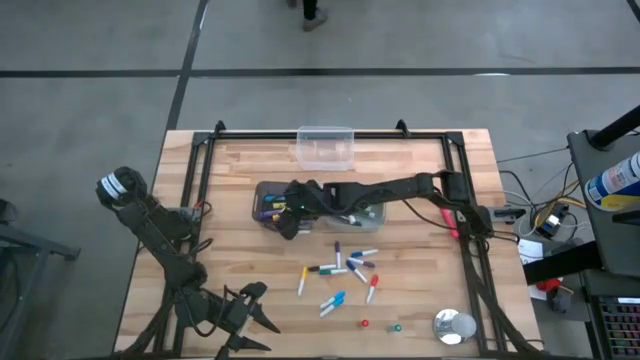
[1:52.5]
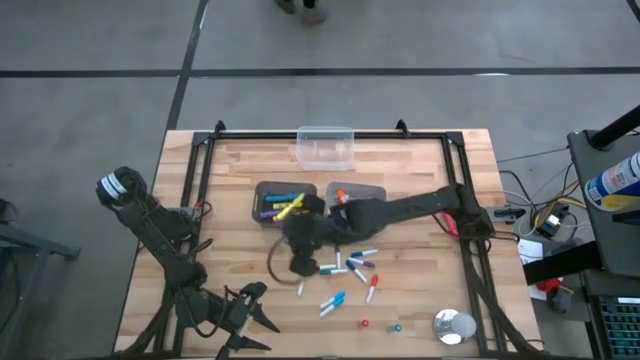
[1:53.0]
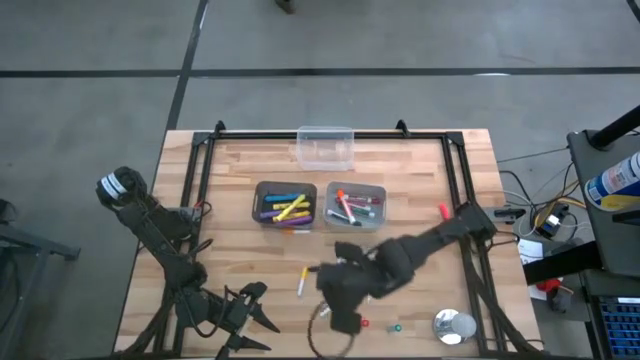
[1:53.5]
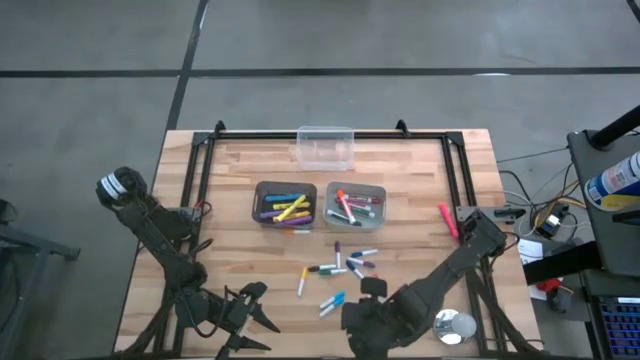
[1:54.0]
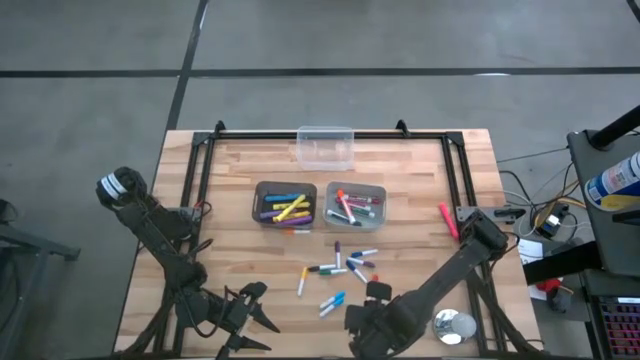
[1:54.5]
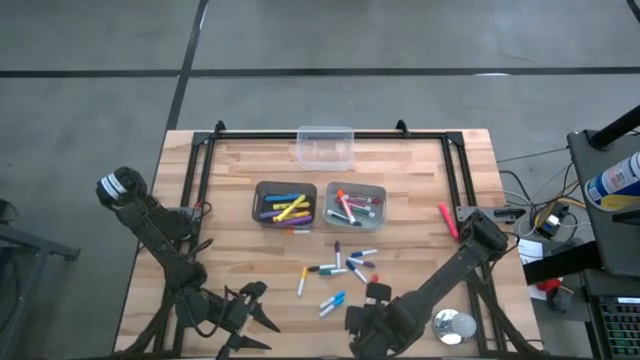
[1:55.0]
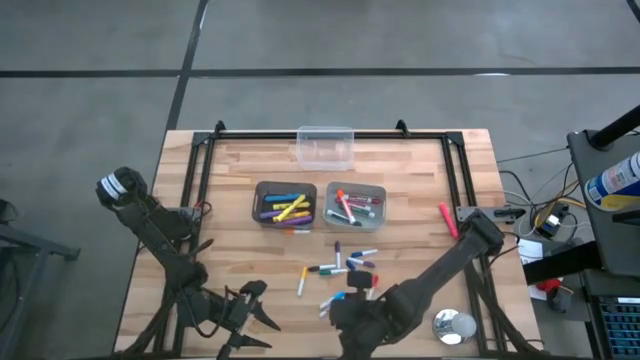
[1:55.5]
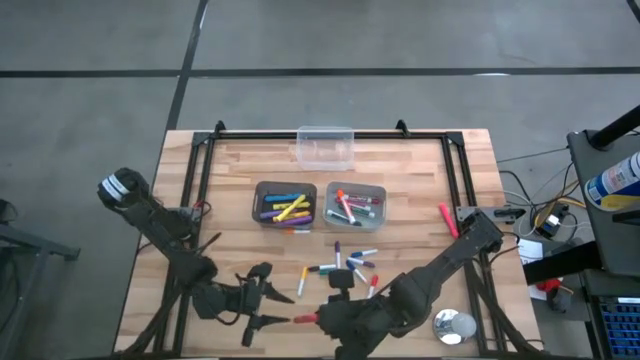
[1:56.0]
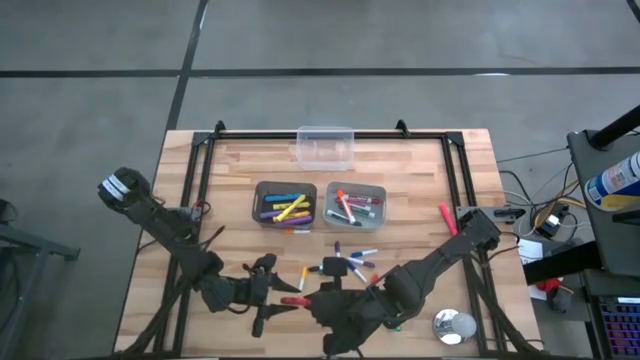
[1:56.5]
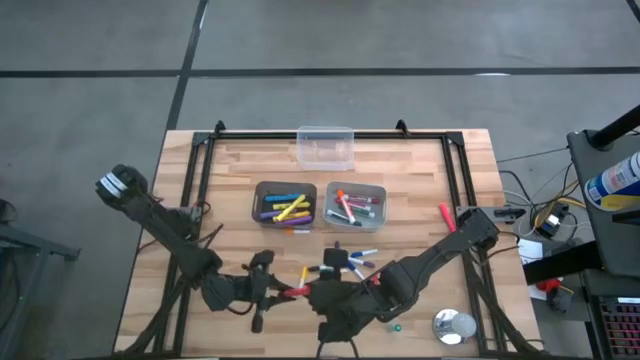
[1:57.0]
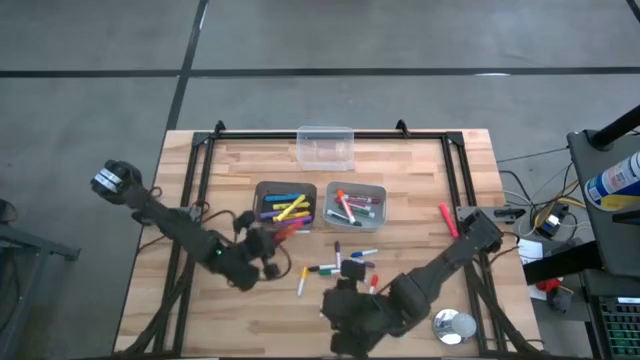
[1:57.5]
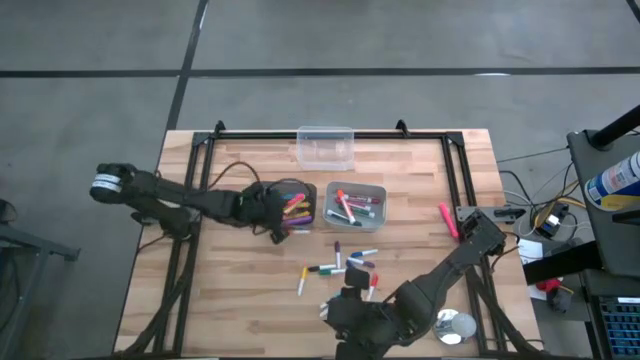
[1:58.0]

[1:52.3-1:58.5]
Task: Pick & Place Markers
Put the large orange highlighter pen into the black bin

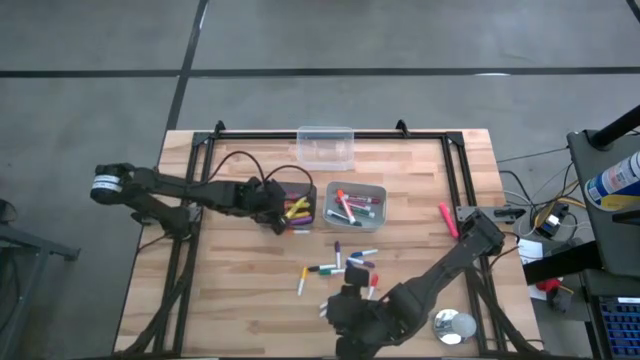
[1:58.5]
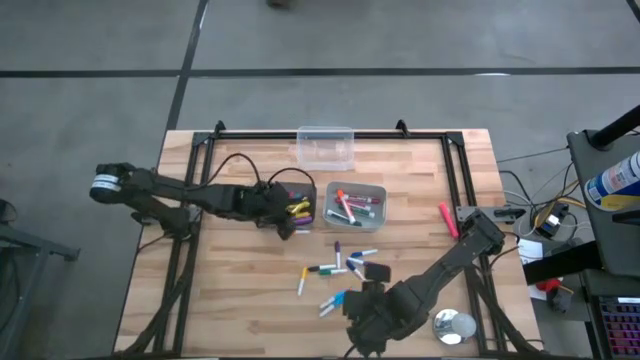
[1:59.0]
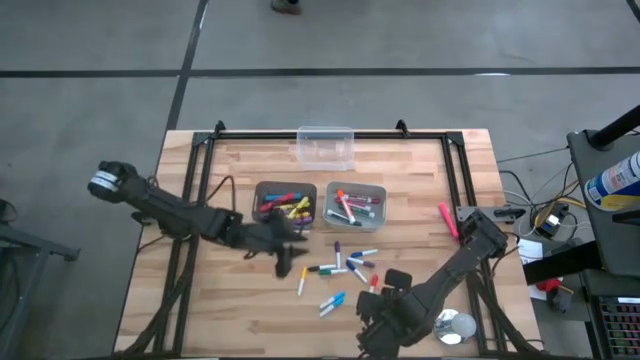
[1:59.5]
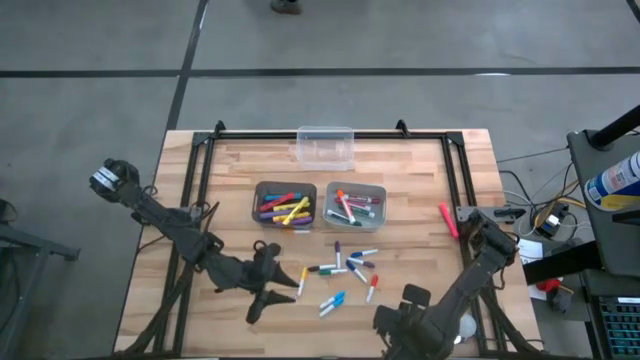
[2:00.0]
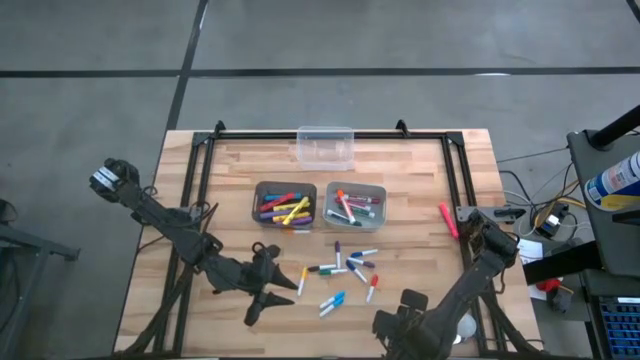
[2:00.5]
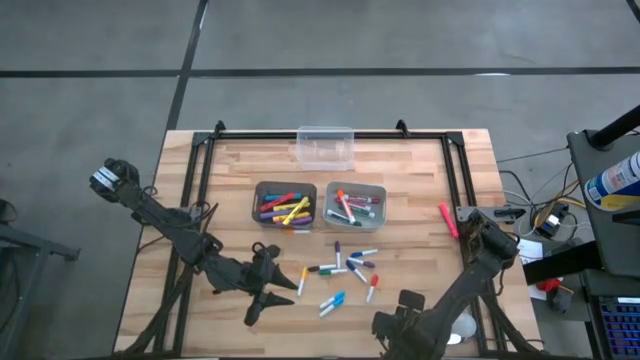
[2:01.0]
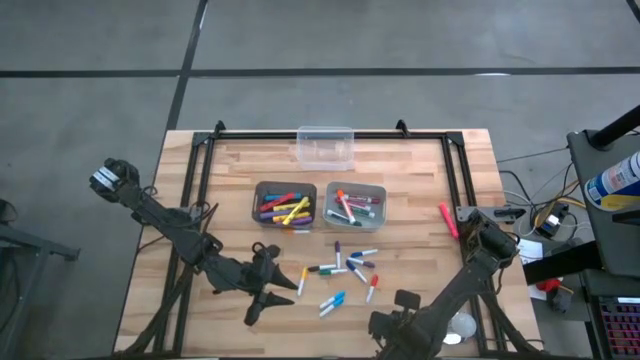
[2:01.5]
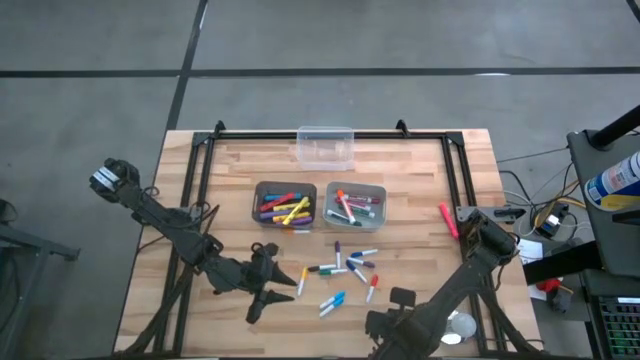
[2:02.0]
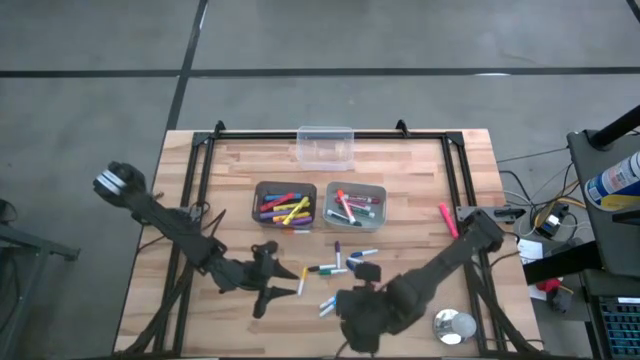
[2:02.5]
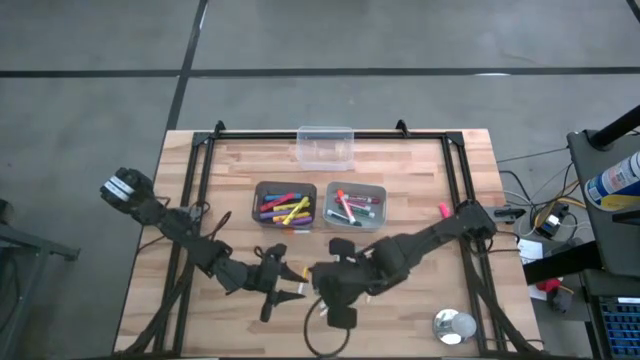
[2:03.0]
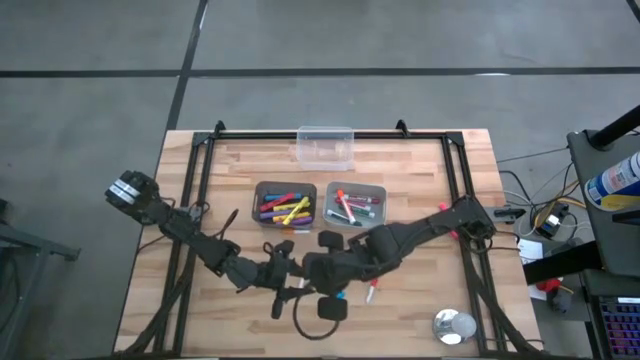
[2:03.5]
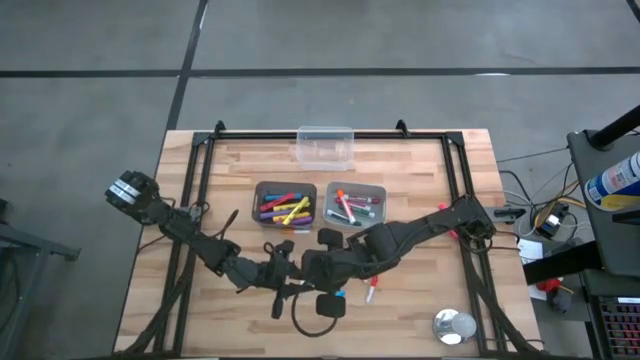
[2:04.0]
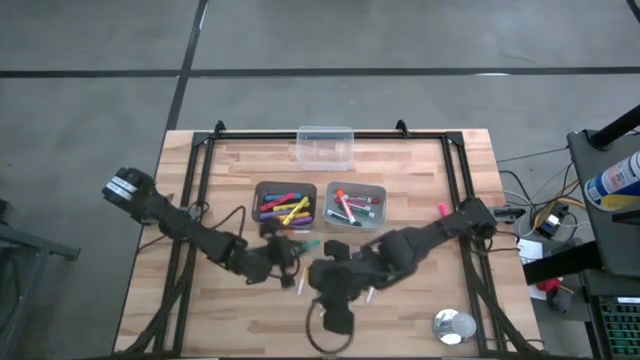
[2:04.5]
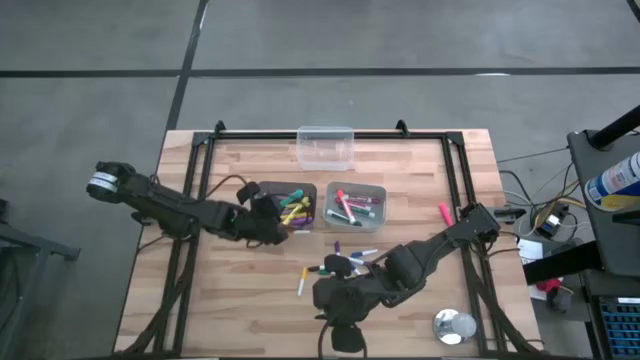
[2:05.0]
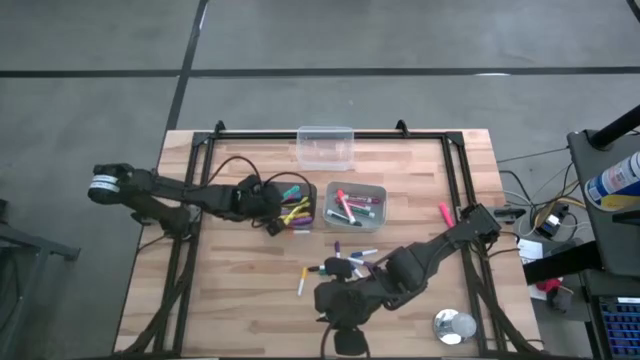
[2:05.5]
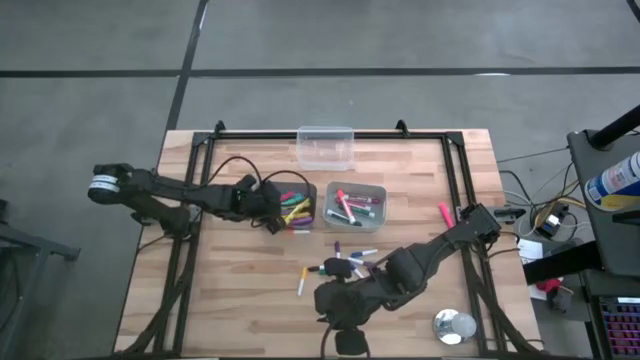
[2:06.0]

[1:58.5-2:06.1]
Put the large light blue highlighter pen into the black bin

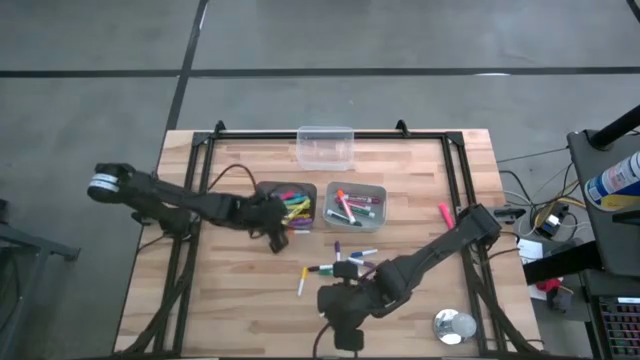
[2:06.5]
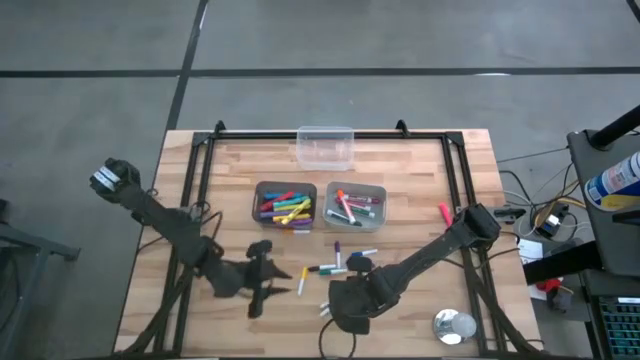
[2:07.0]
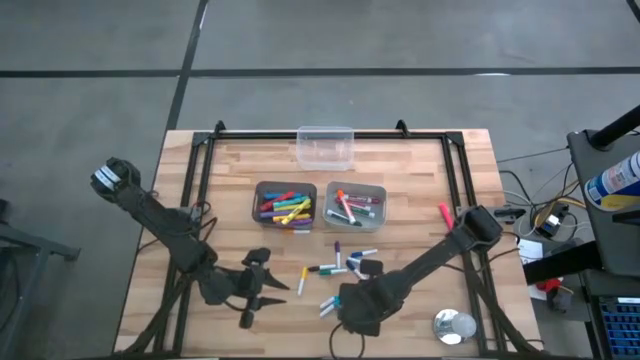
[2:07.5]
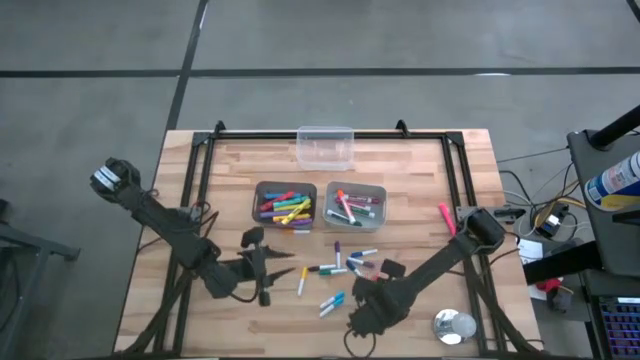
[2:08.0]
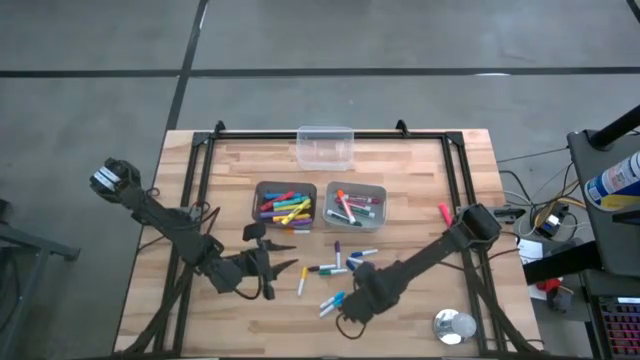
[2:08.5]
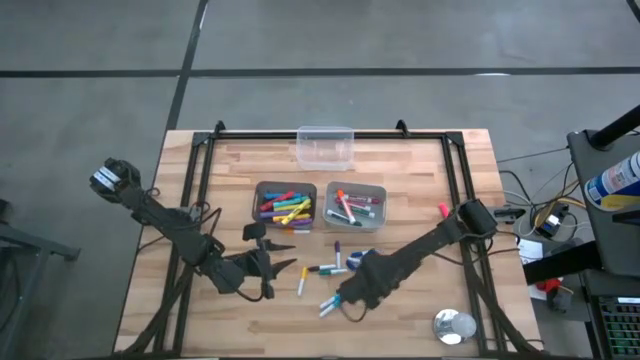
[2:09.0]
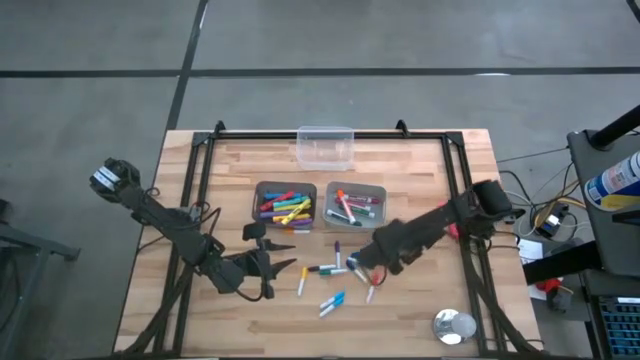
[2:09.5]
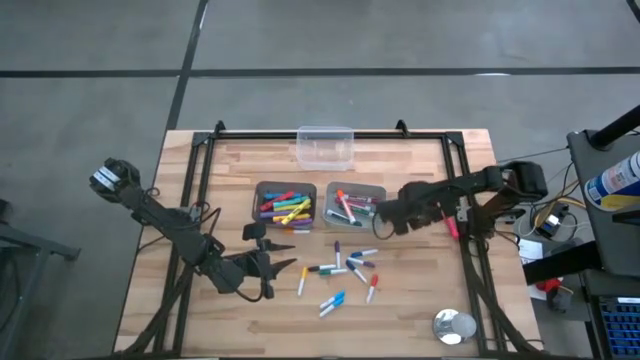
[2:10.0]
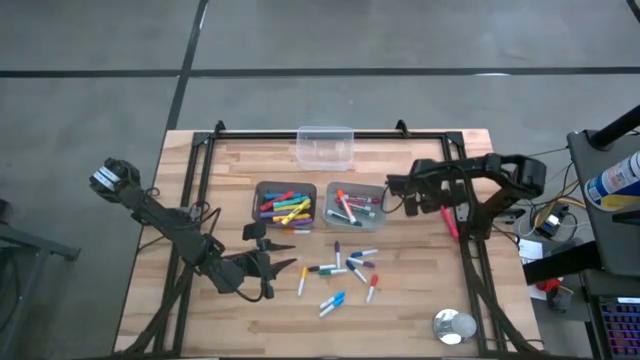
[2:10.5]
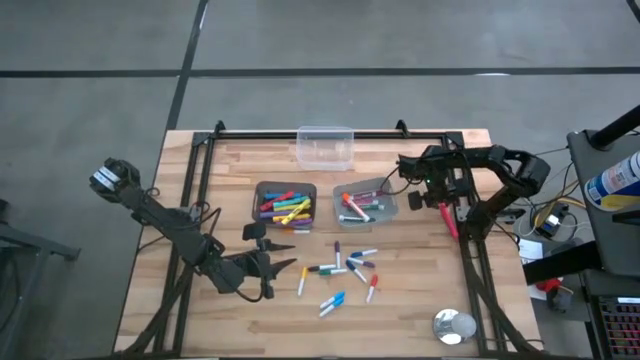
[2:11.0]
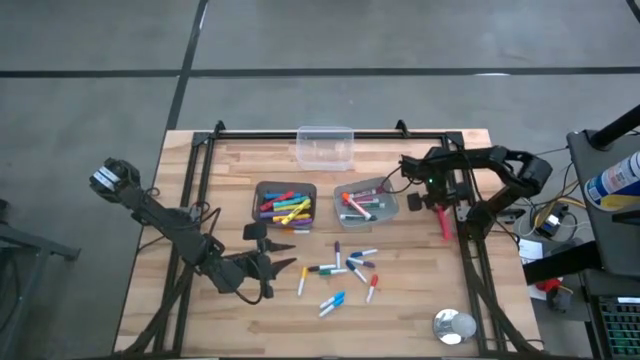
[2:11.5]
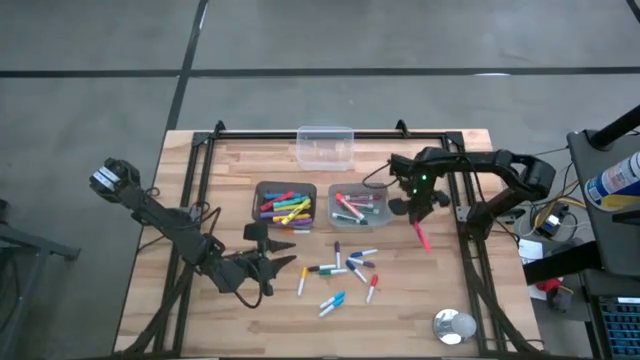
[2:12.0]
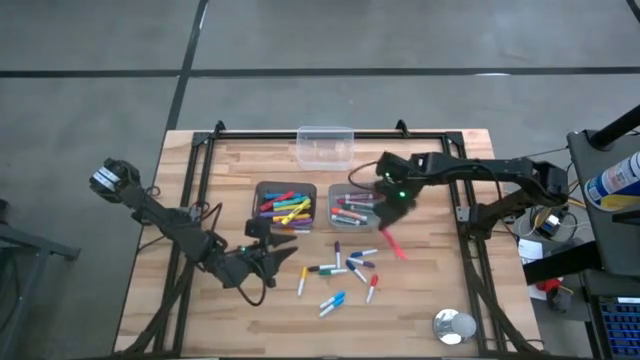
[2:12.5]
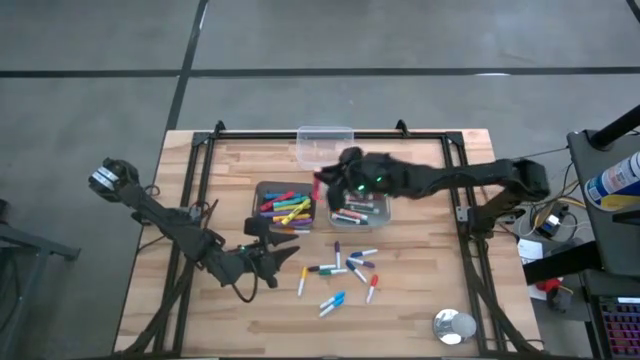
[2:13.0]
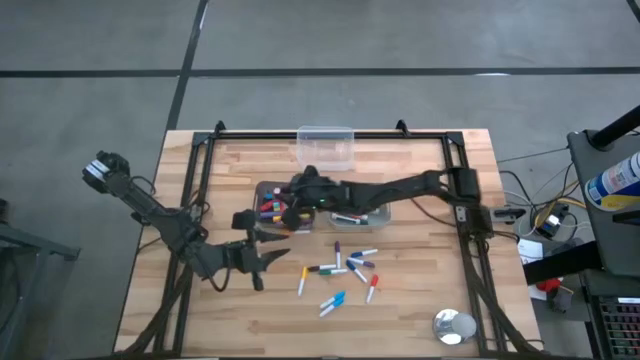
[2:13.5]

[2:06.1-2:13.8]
Put the large pink highlighter pen into the black bin
